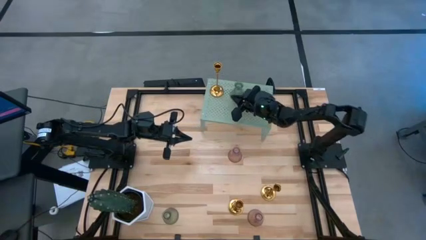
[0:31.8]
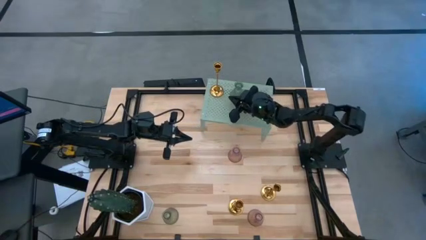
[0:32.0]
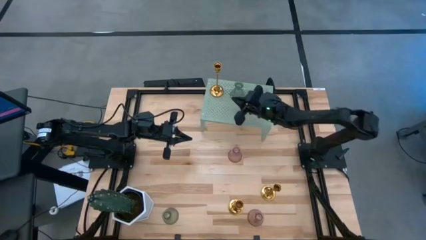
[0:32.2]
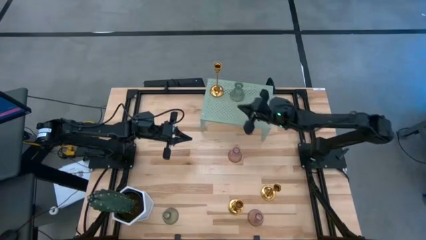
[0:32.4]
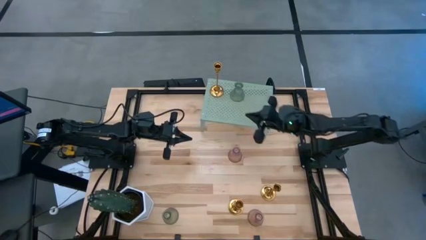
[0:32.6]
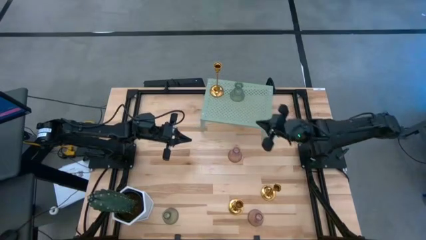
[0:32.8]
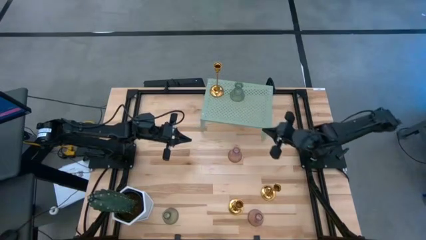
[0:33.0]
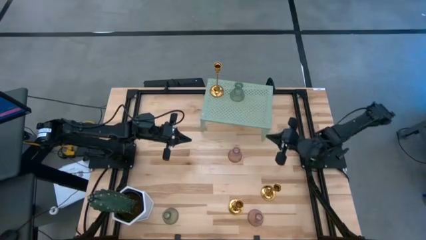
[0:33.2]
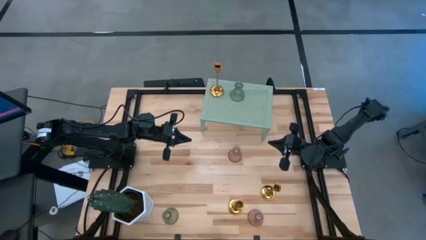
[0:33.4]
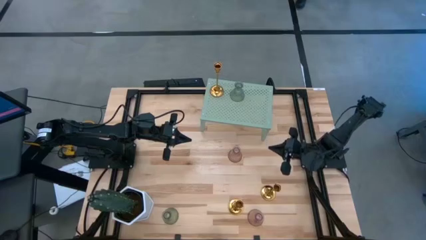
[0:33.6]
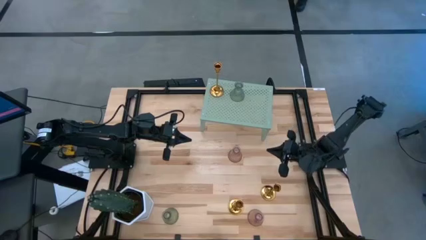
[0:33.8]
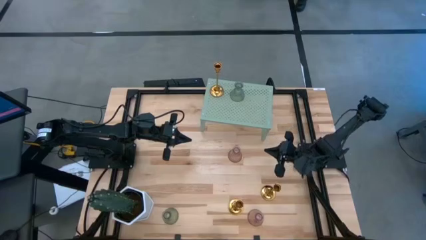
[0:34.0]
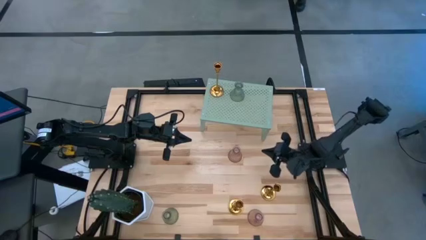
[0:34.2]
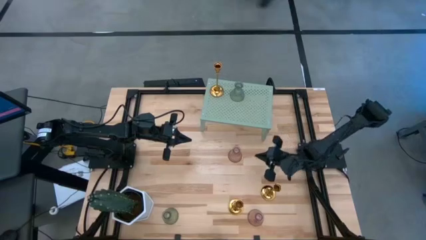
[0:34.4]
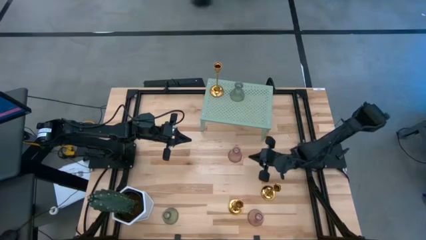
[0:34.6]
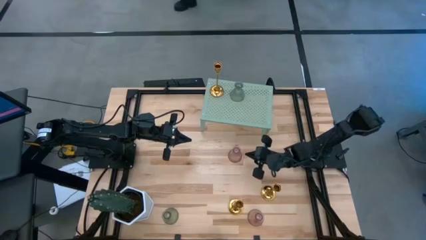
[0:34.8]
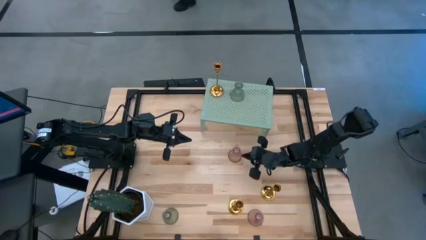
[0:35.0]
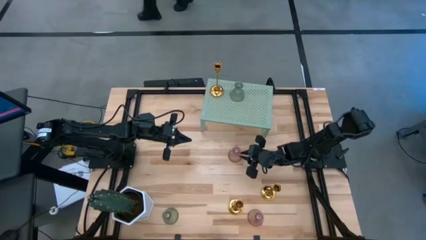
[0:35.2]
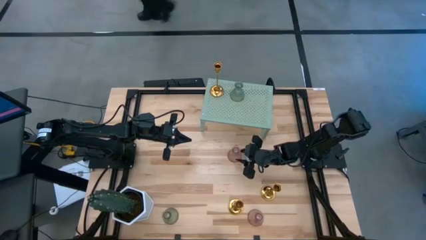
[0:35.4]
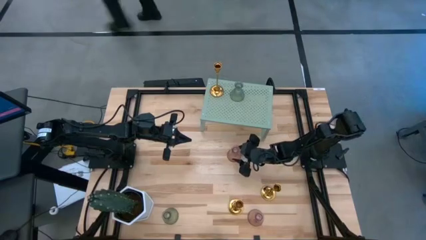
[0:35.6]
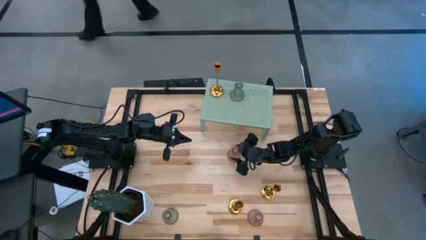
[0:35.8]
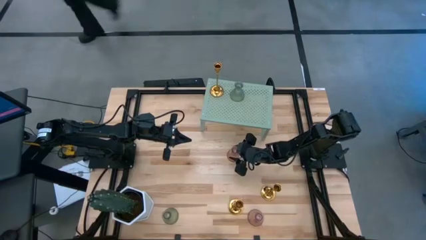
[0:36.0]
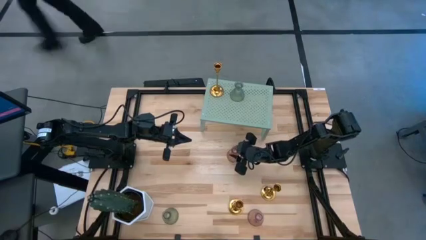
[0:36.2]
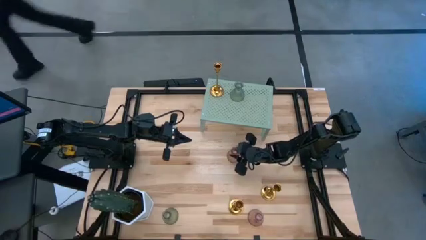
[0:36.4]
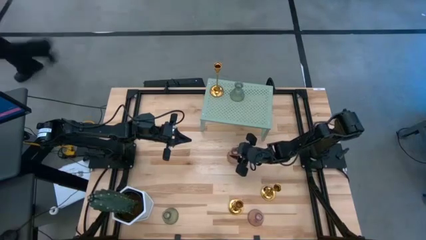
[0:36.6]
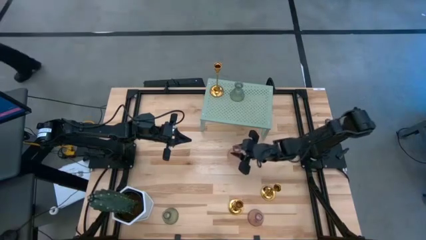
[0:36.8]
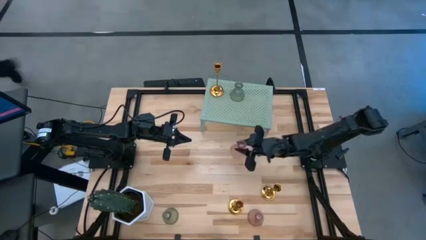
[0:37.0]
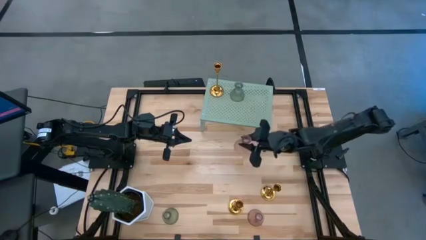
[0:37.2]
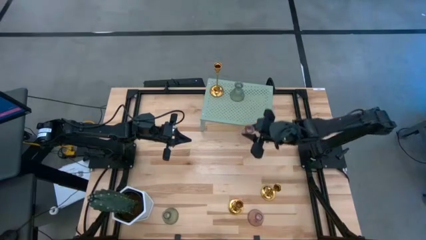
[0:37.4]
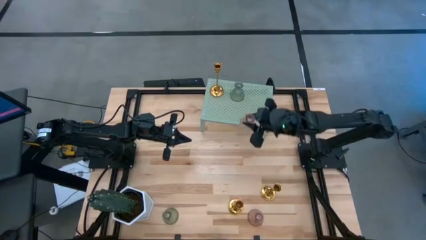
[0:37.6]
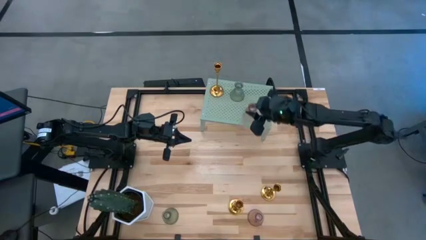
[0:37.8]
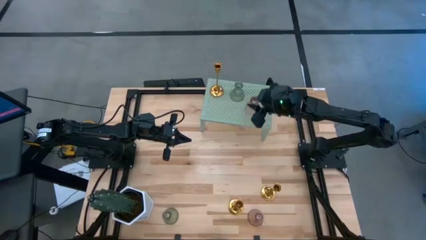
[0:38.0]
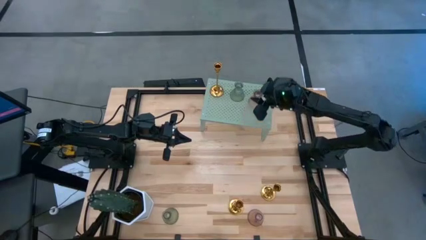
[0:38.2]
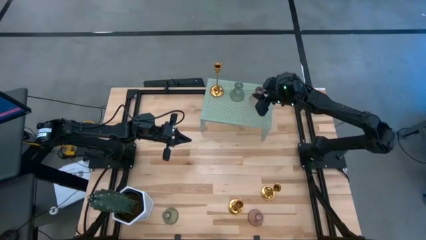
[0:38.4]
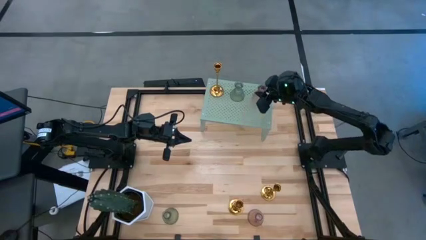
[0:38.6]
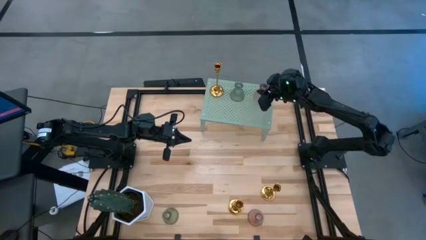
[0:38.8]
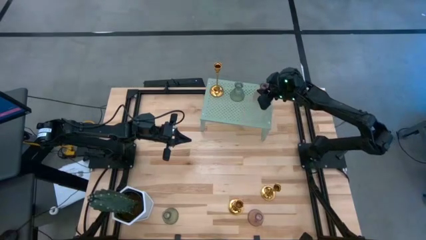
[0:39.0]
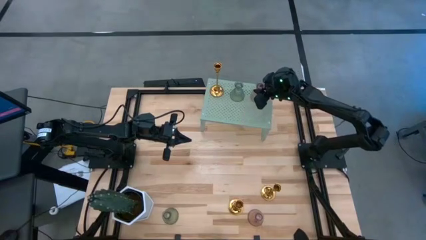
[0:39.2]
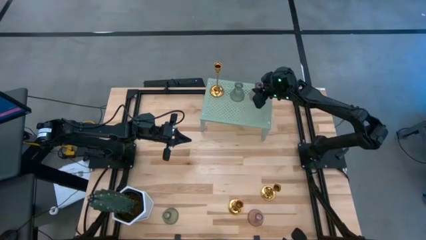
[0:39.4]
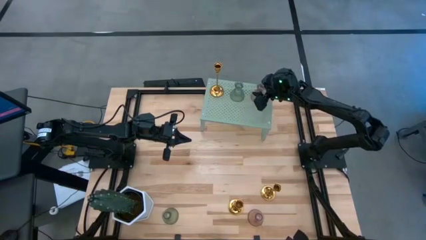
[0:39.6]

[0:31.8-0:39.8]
Task: Pick & Place candle stick holders
Put the top purple glass candle holder on the shelf
